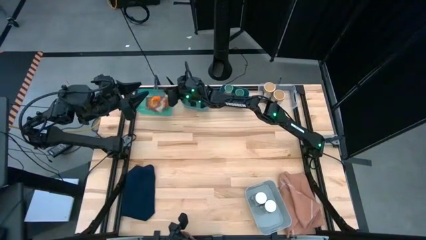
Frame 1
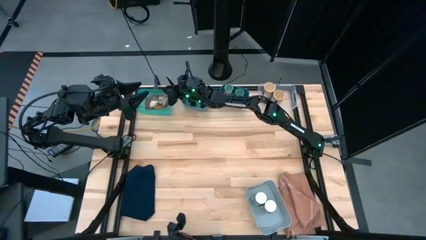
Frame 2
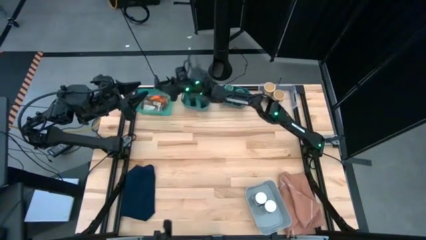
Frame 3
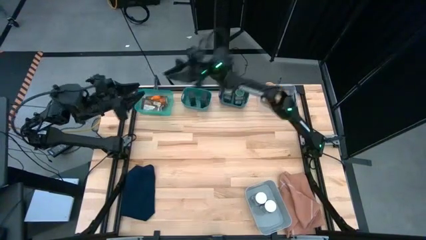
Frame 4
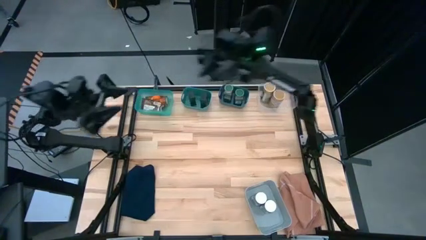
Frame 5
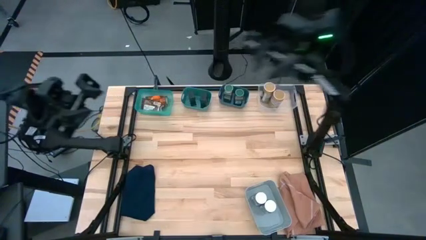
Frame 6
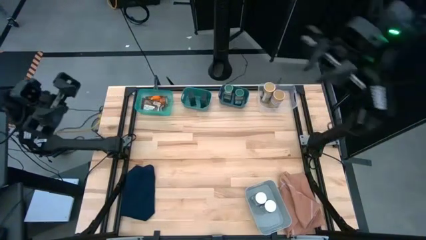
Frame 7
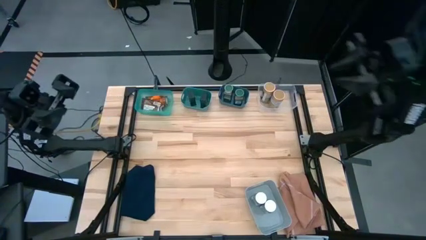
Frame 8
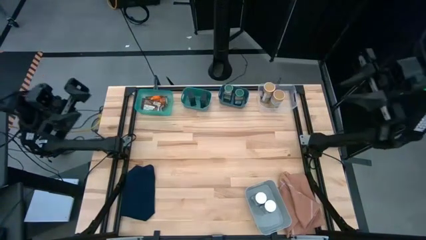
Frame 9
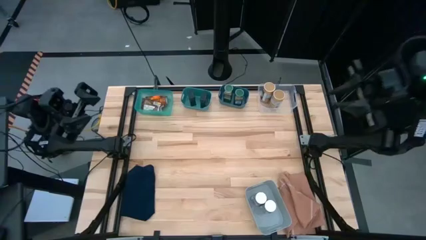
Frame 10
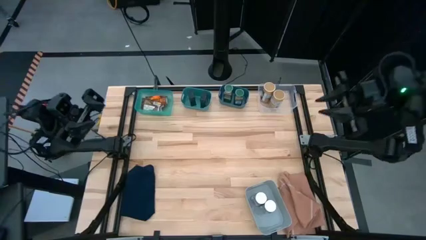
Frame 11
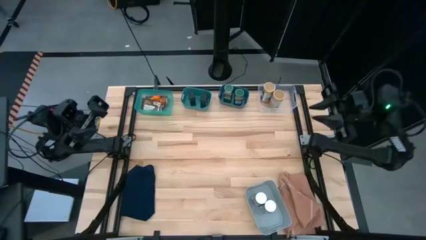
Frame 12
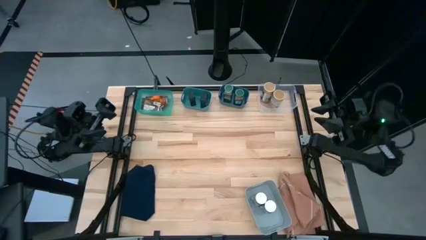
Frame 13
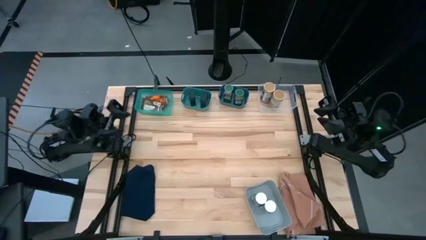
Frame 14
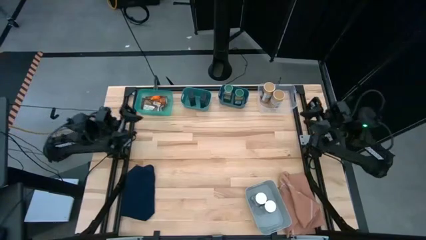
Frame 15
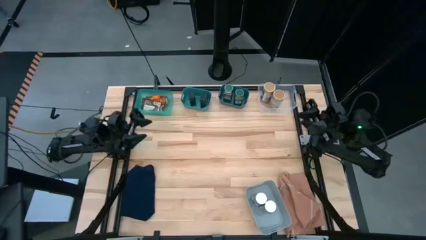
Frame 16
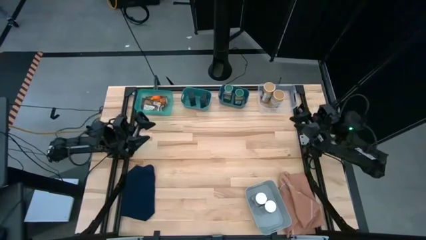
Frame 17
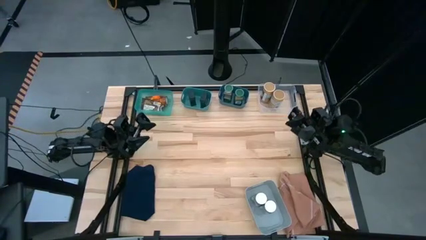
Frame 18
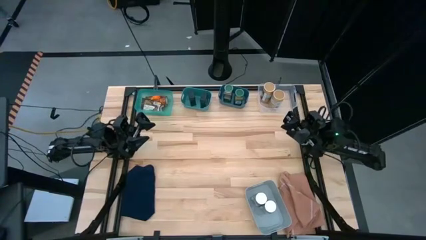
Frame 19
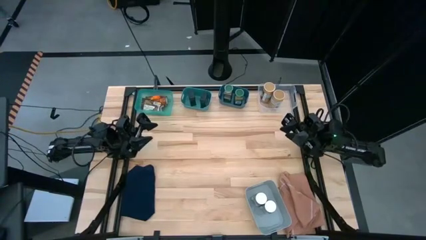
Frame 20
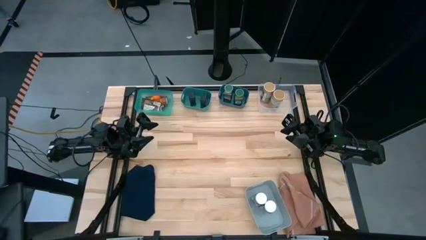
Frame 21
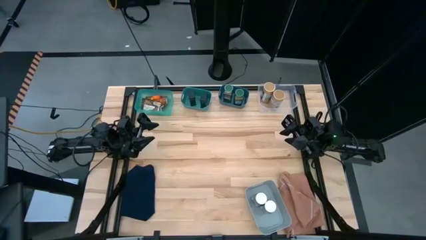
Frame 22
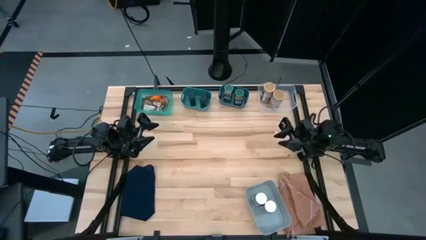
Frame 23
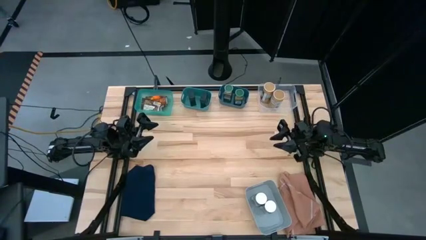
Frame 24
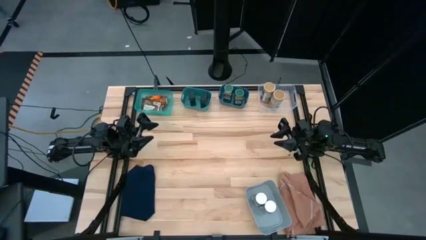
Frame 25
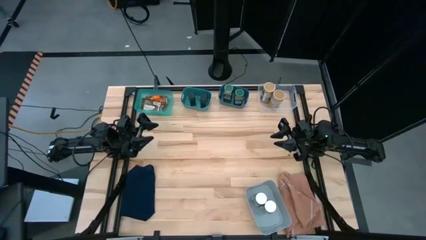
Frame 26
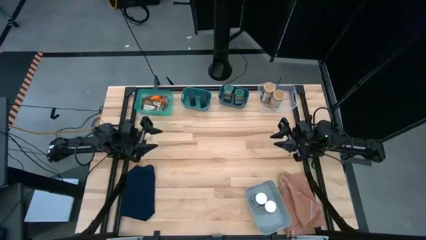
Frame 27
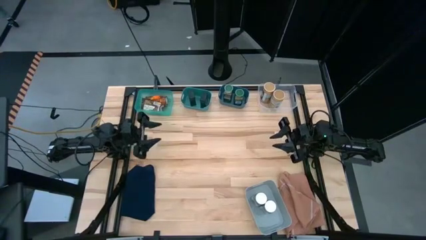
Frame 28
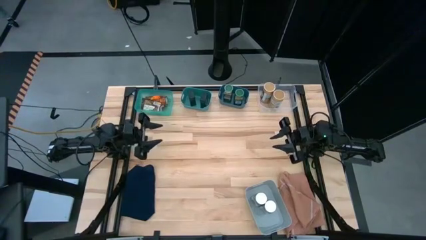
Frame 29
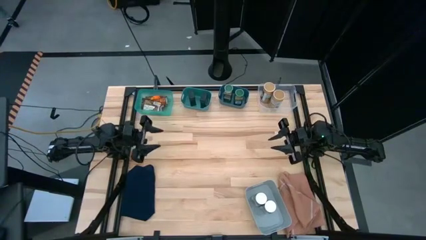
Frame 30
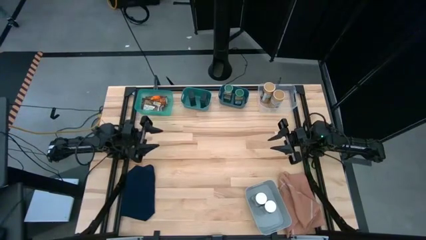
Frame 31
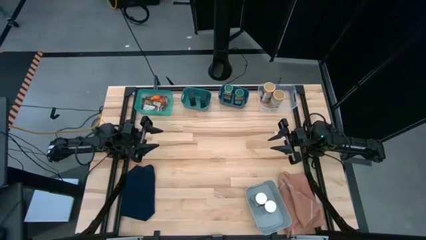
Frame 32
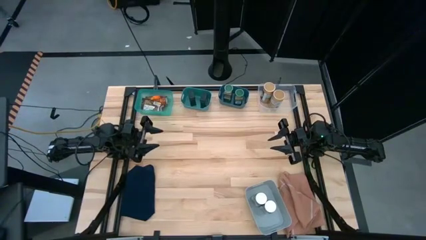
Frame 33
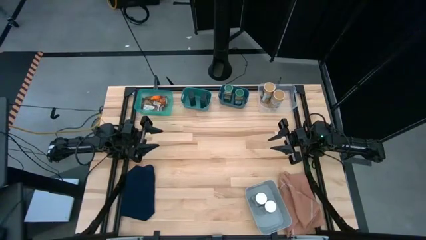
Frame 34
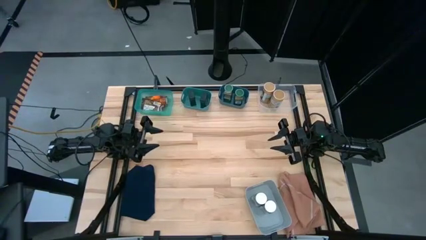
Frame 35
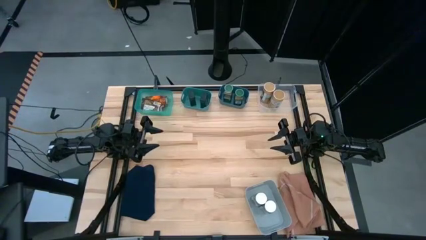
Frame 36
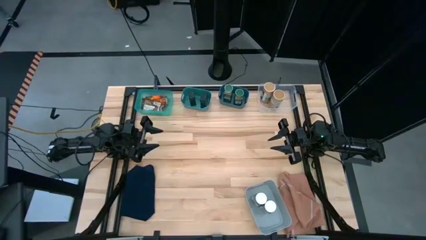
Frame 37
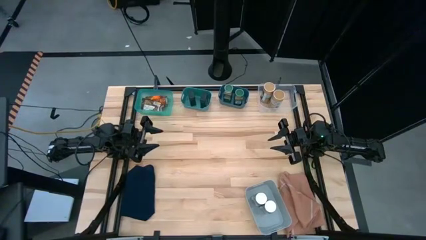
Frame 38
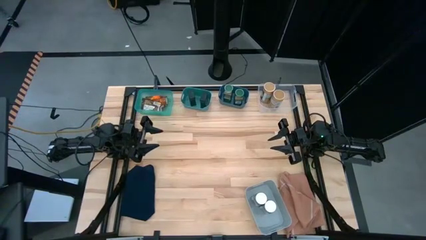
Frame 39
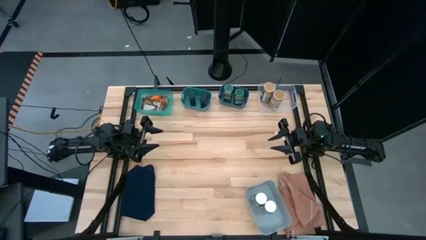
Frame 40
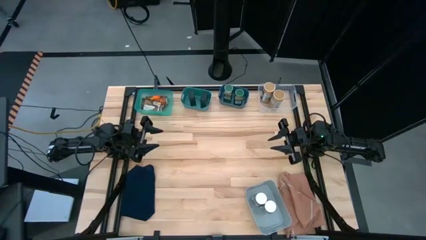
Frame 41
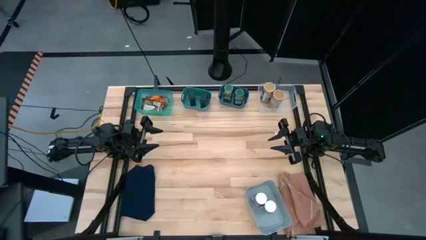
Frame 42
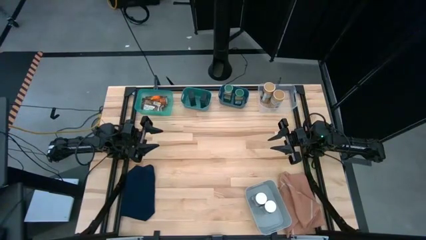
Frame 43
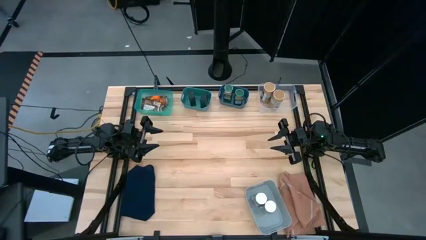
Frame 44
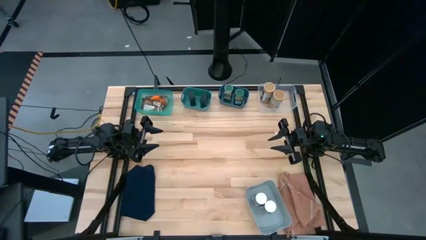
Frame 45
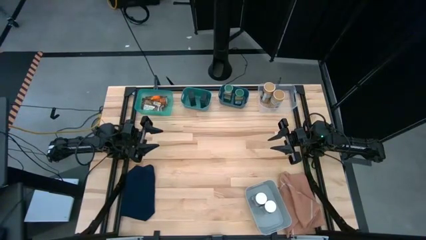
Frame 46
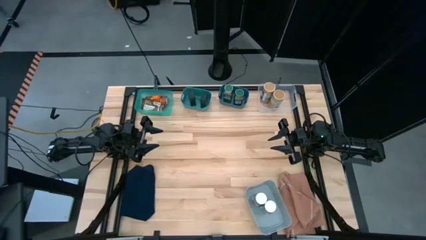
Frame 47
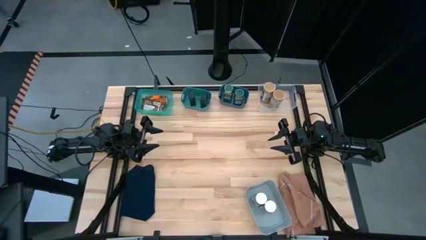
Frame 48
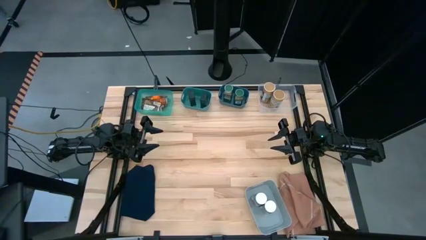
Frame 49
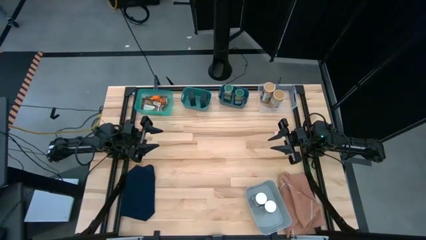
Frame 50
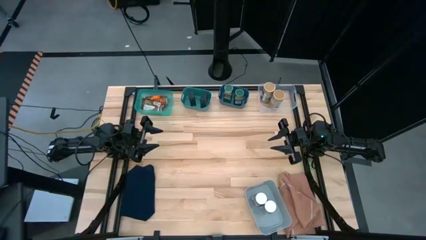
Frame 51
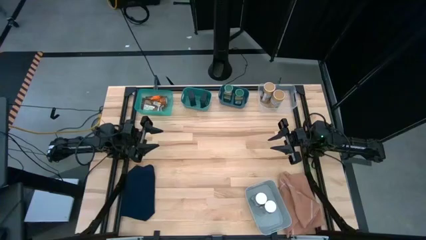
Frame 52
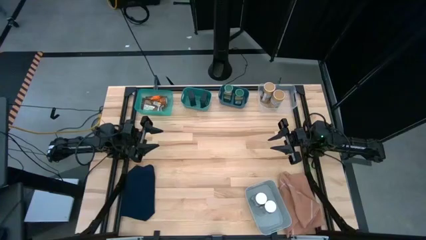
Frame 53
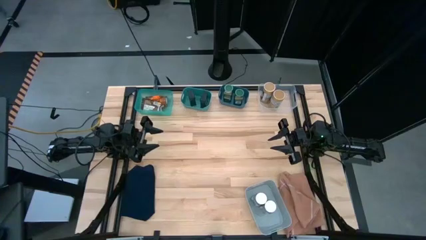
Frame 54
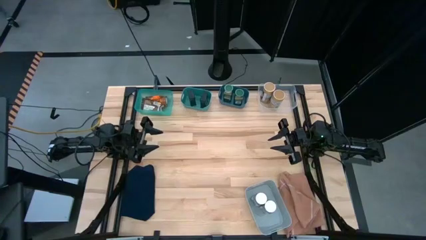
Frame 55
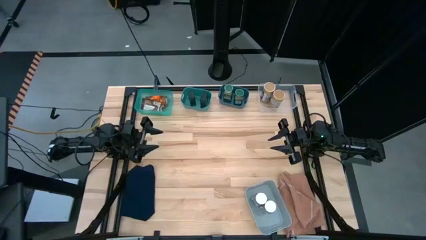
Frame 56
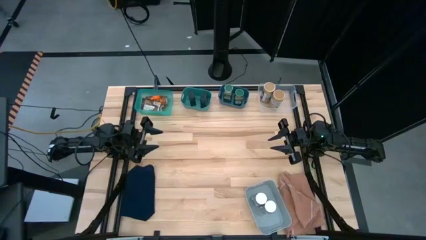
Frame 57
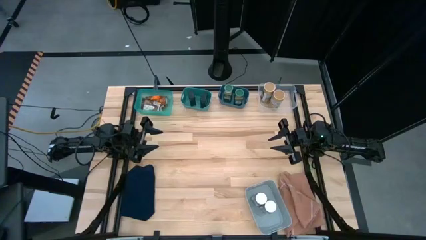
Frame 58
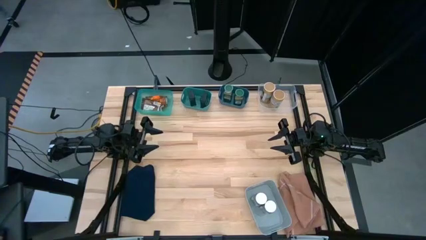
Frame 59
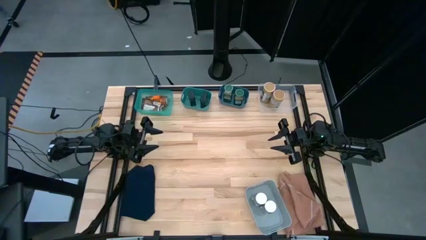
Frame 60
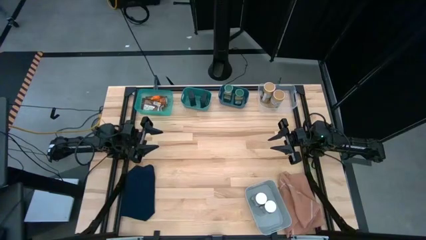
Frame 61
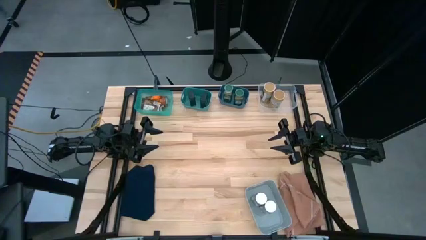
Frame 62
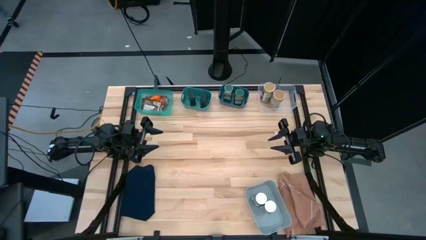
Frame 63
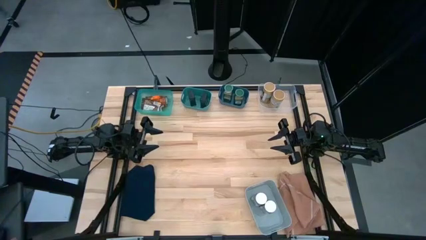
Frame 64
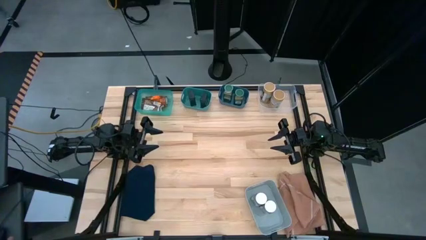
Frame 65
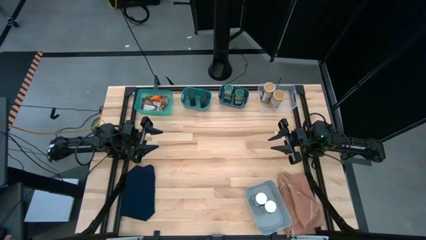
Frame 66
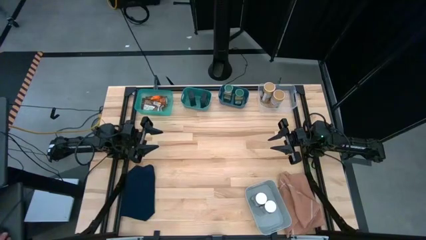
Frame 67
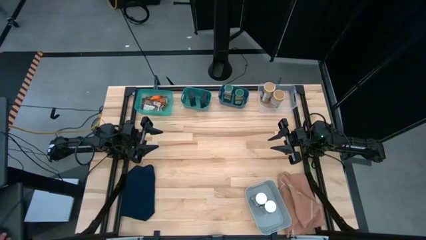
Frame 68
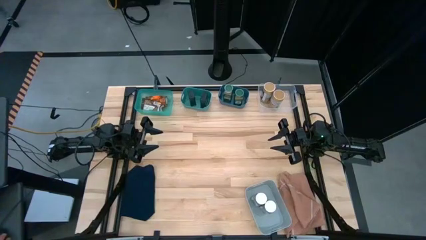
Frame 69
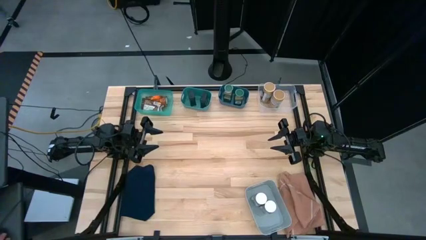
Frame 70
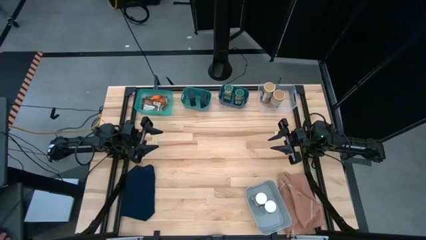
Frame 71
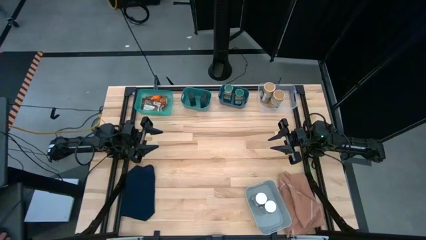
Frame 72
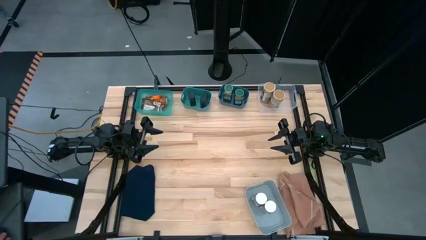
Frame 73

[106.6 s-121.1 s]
Task: Sort spices by type
Return to Home Position
